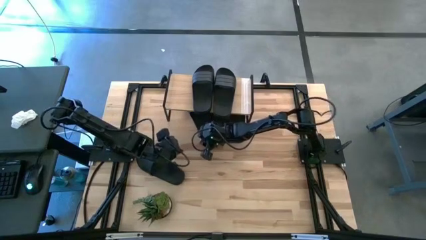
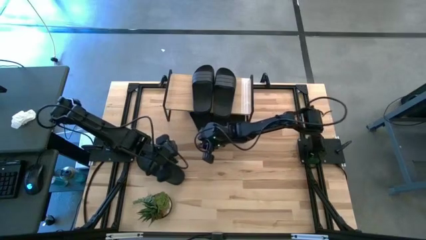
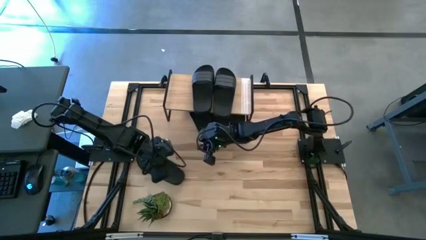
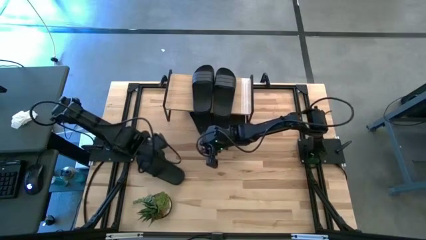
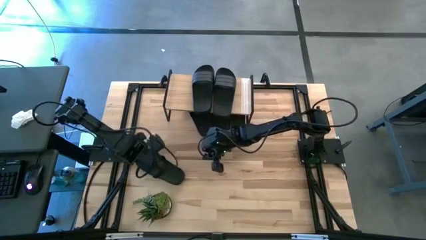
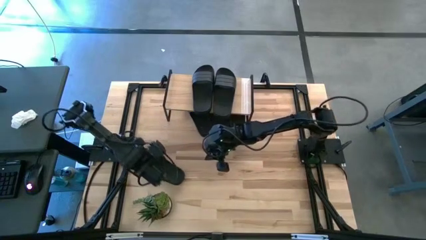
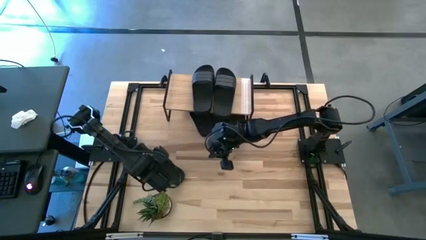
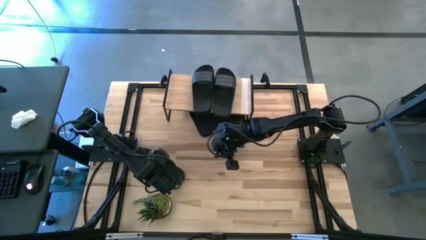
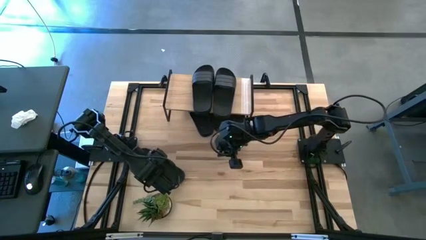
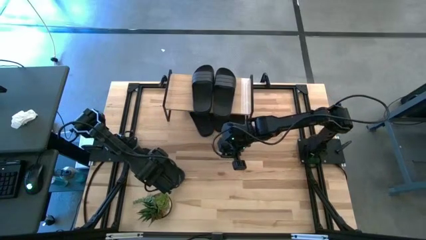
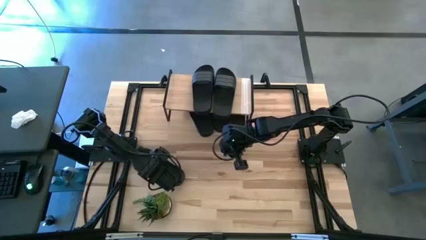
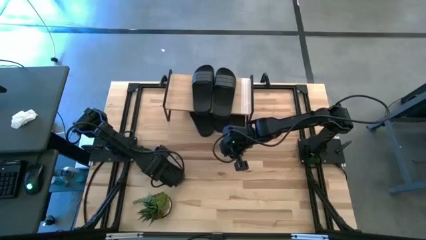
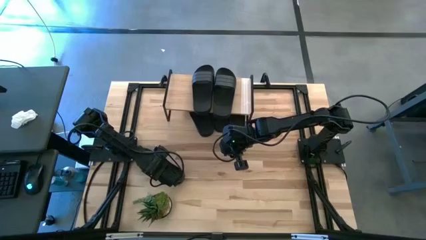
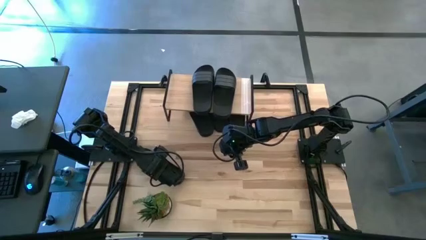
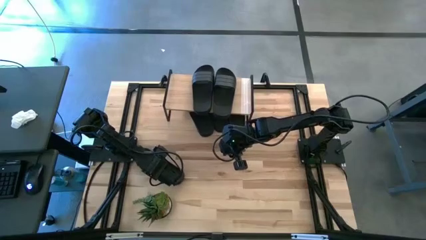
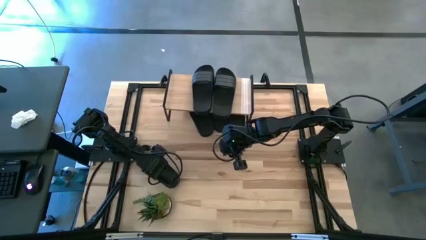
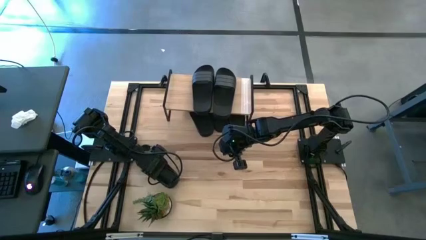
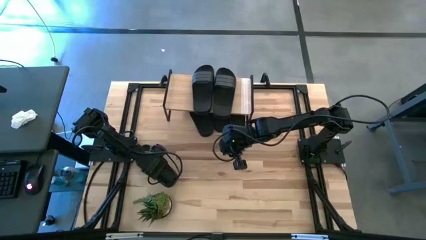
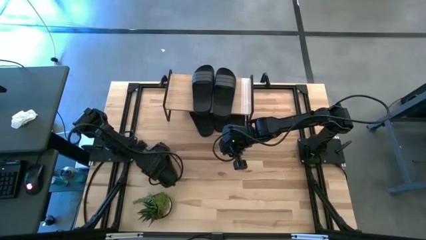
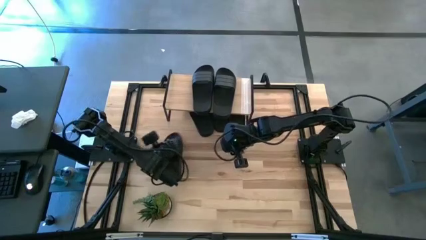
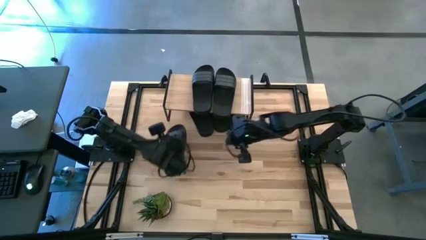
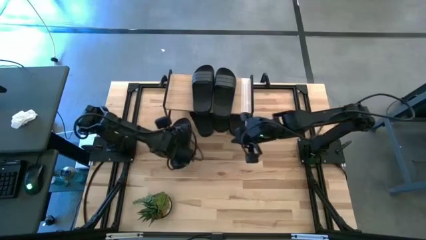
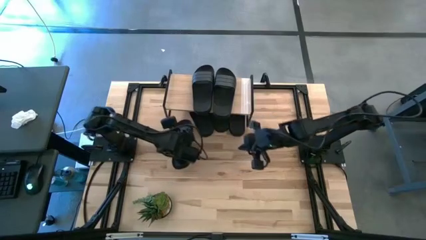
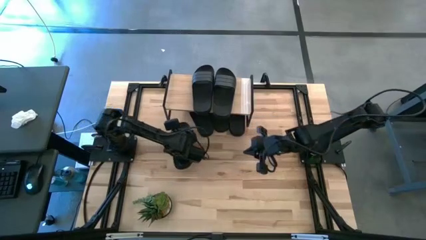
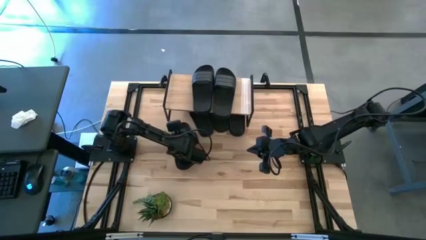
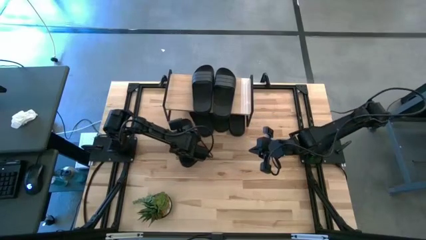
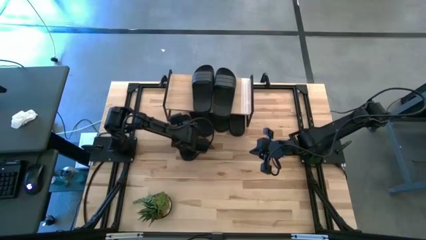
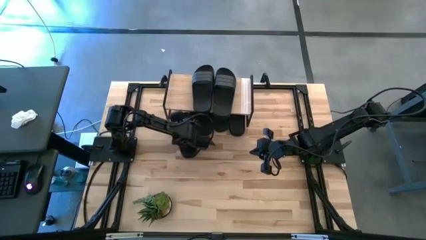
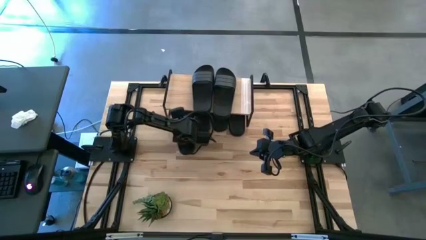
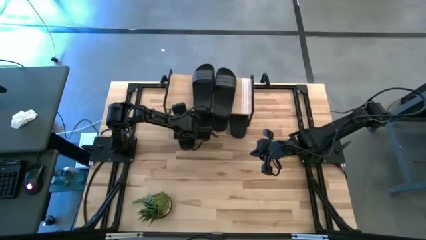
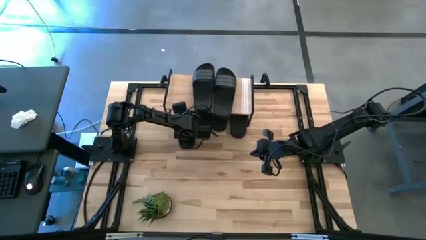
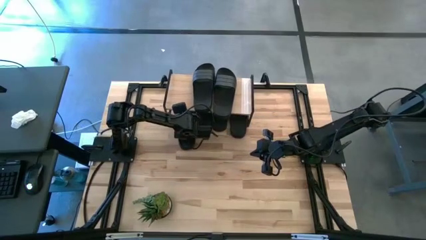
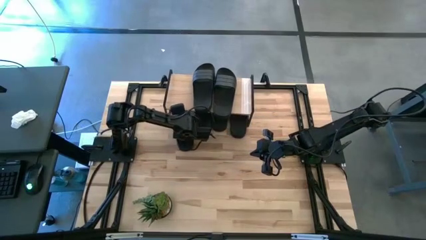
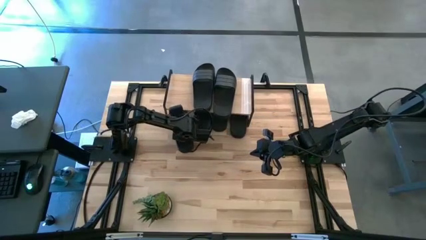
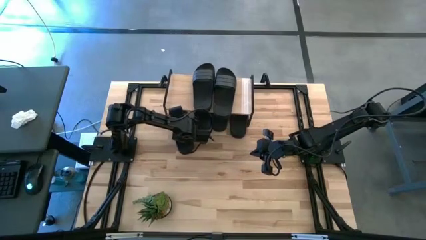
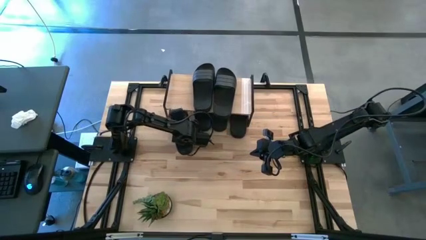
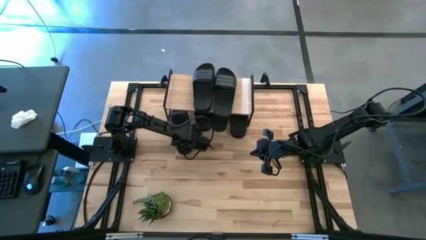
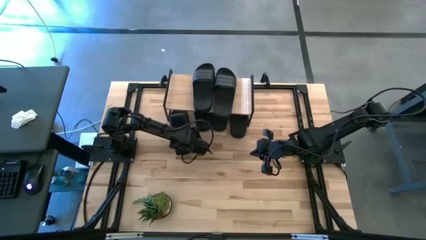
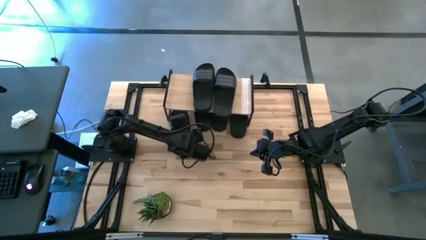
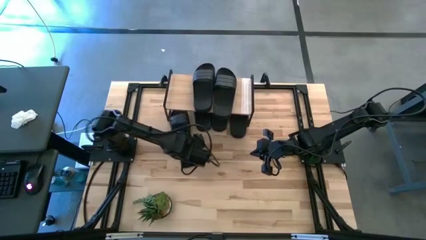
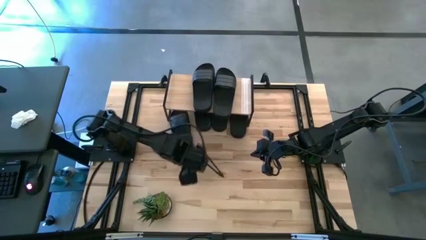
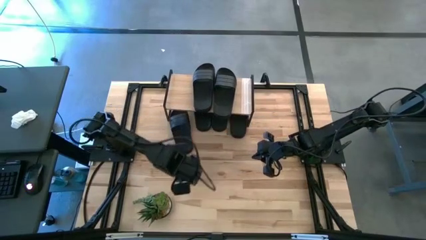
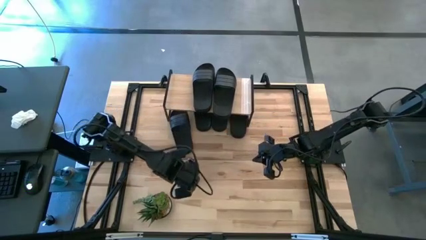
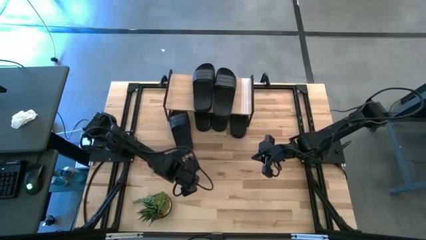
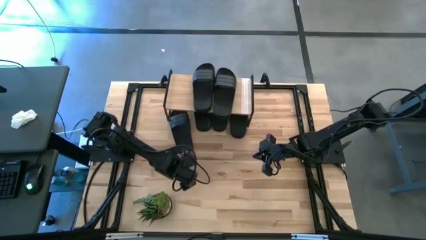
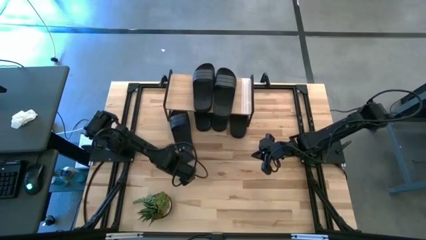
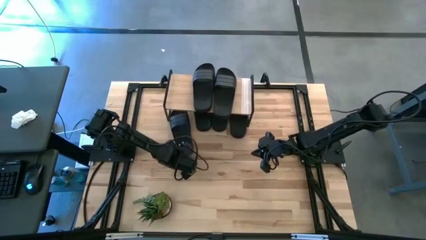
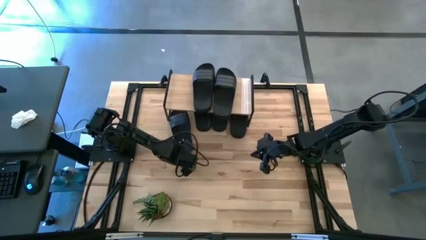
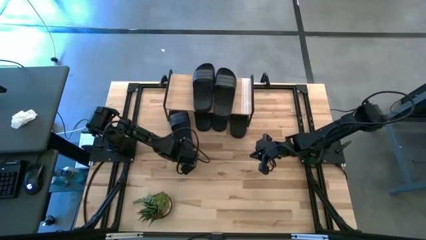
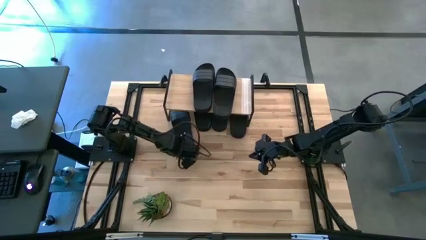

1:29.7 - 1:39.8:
Task: Pick and place slides into the shelf
Put the black slides under the shelf

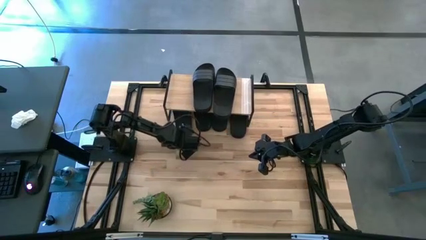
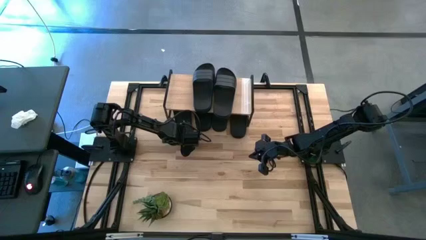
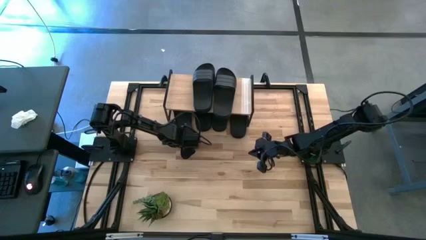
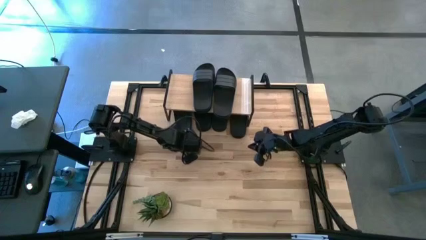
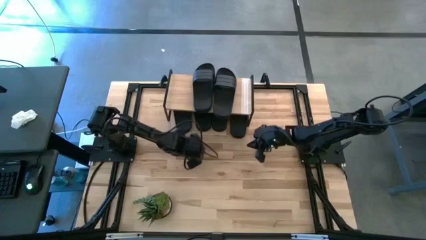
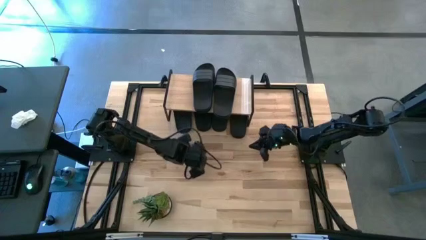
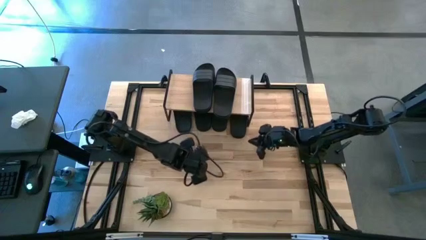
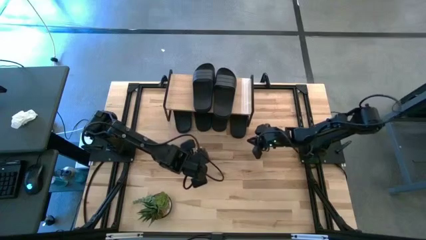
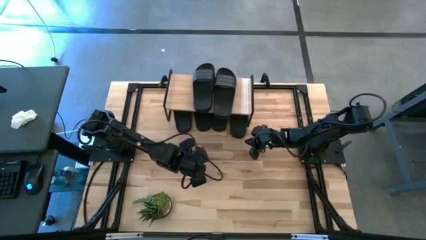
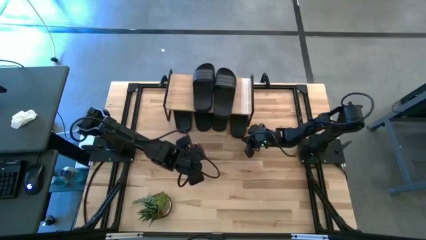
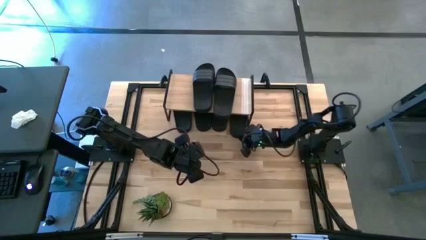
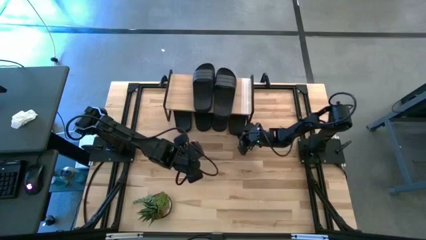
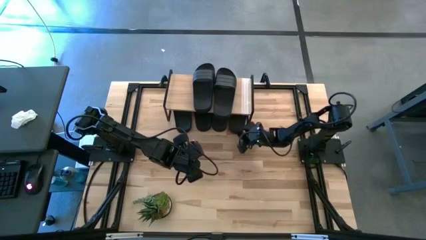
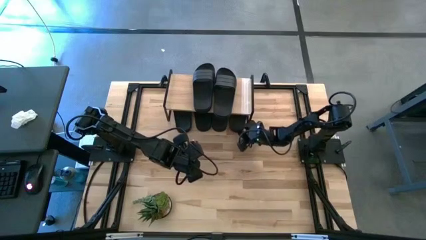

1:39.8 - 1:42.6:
Adjust the right black slide under the shelf

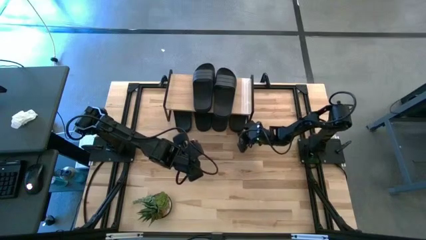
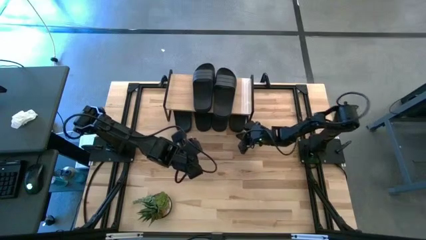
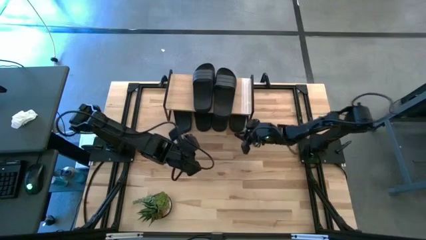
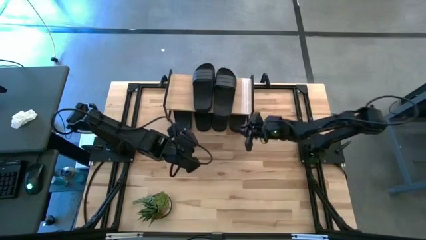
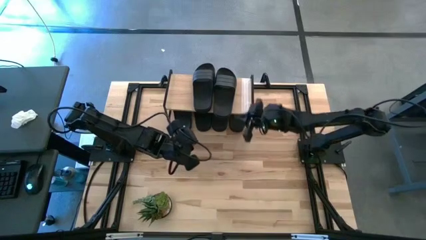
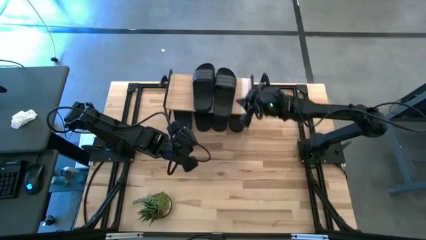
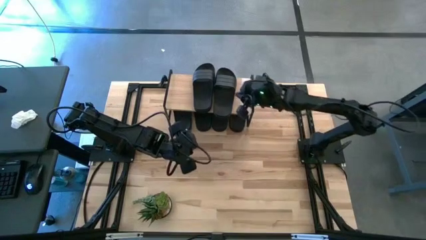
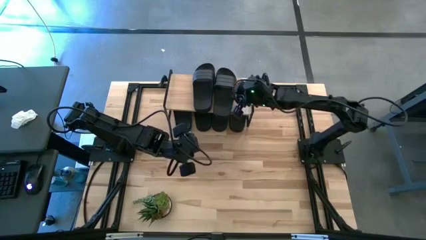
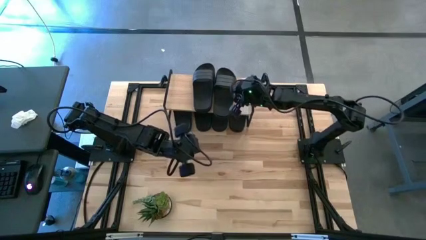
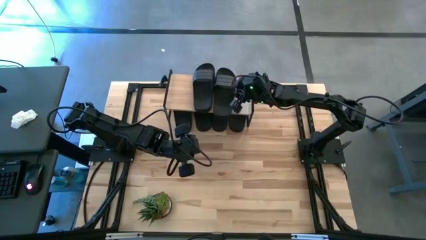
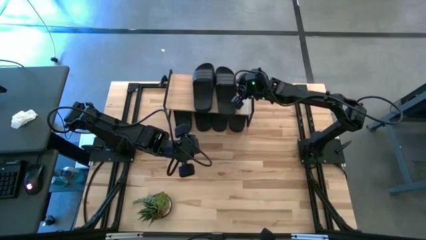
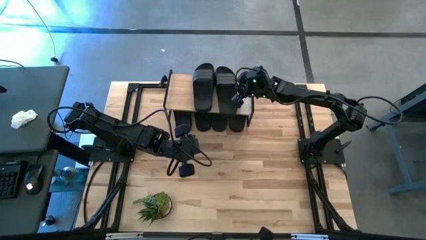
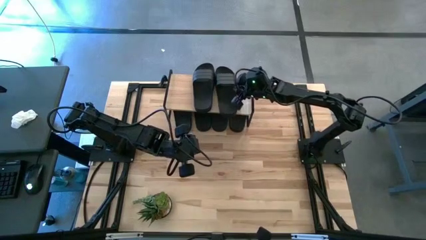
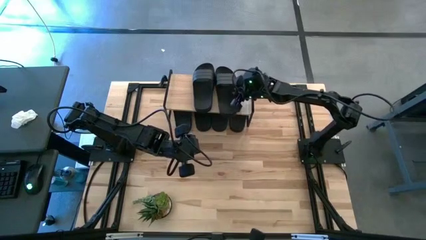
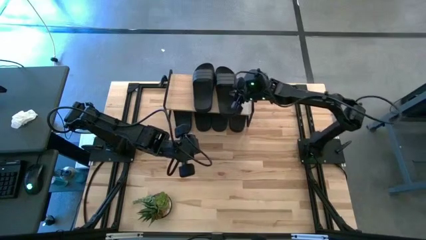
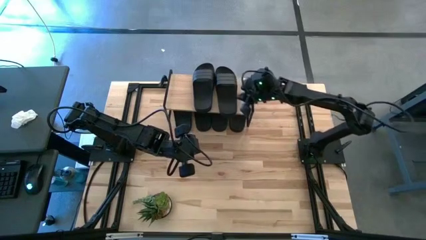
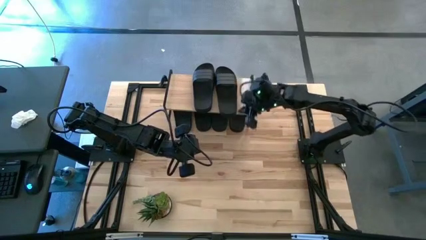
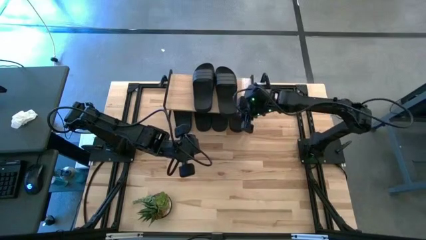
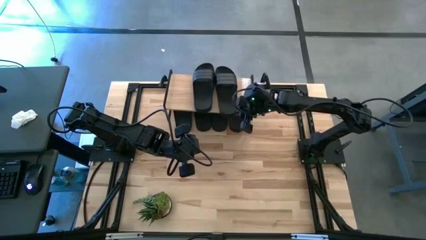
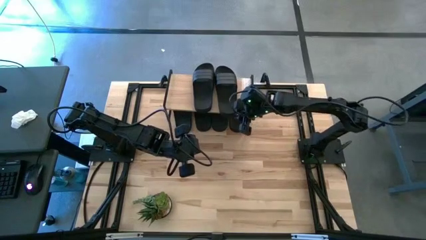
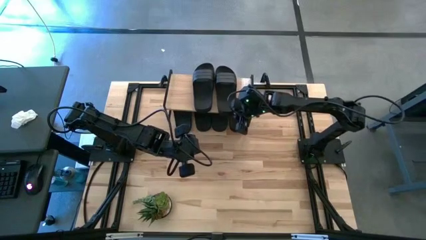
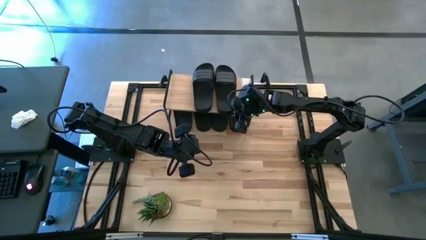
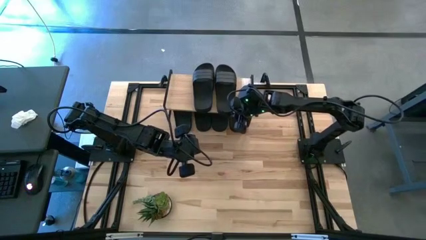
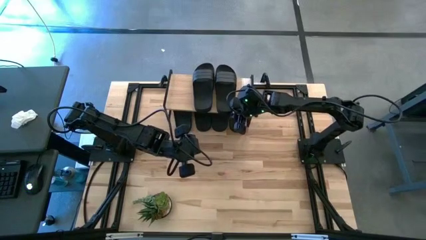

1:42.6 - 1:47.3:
Adjust the right black slide on the shelf
